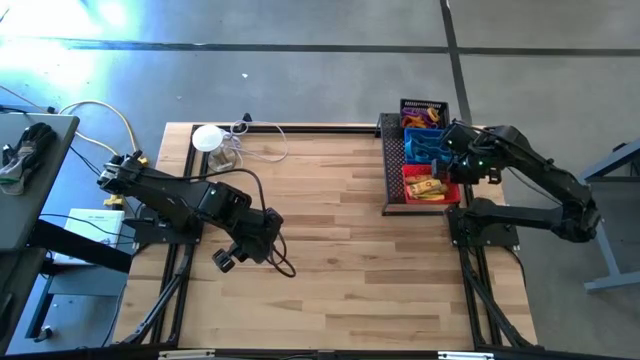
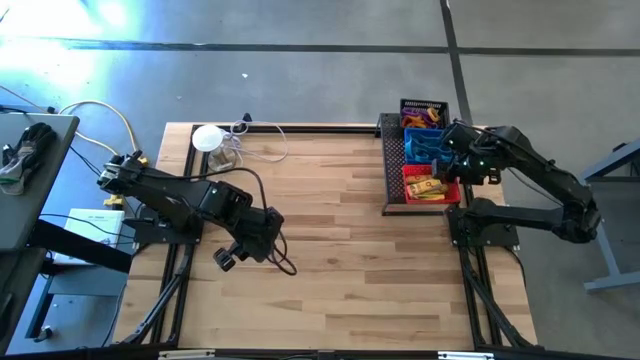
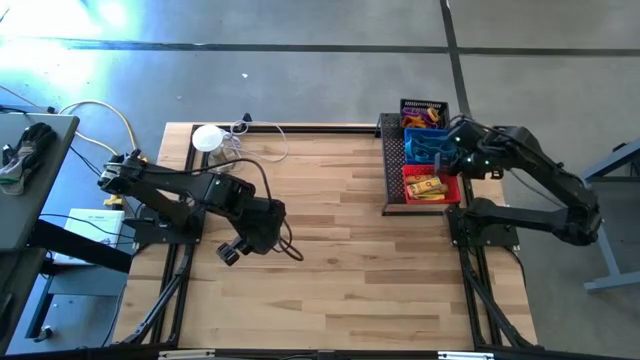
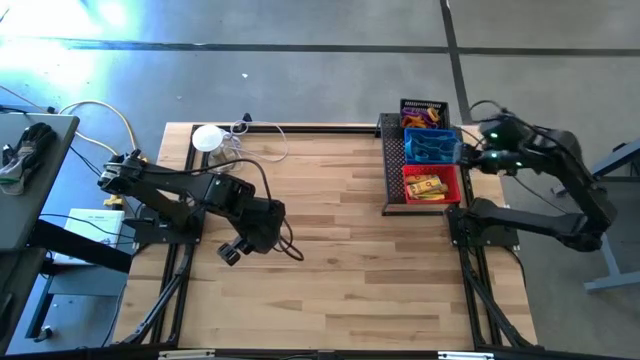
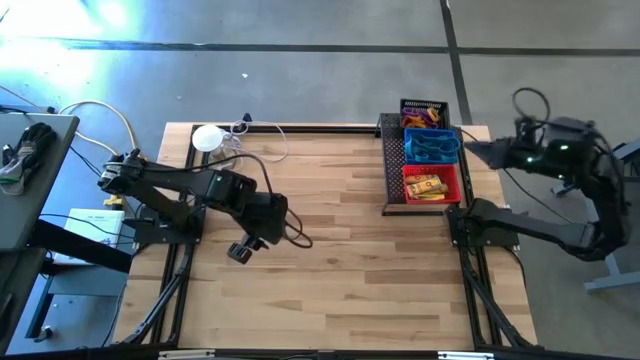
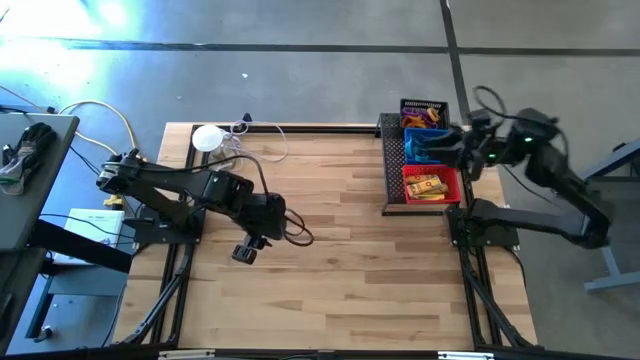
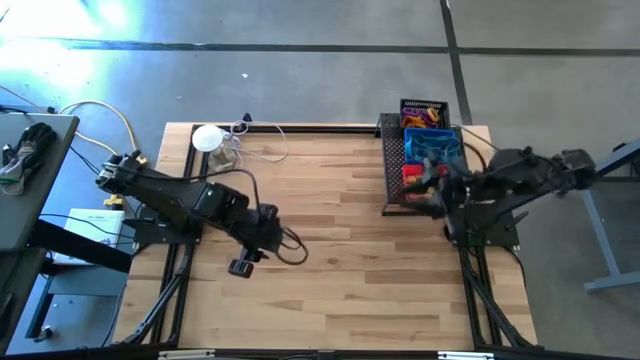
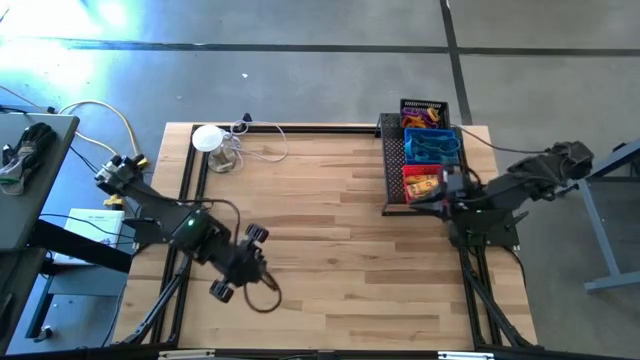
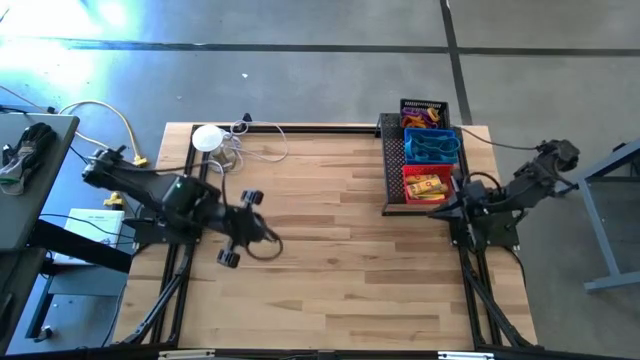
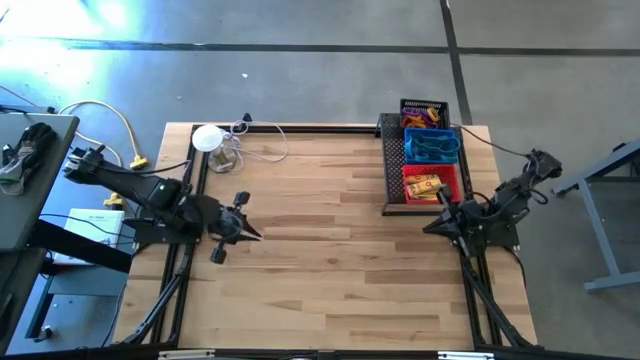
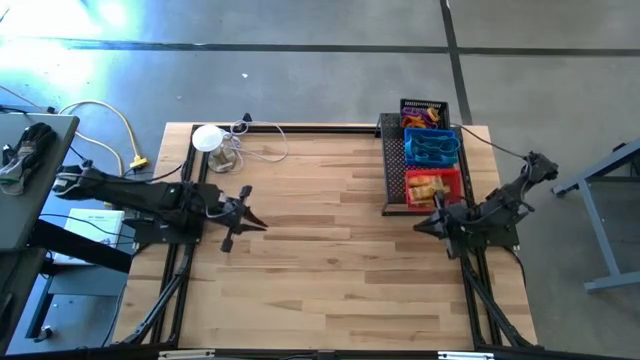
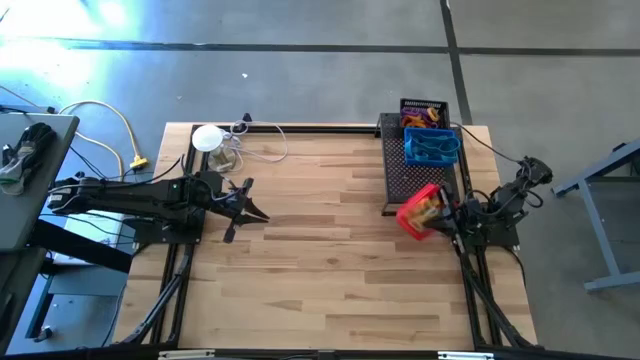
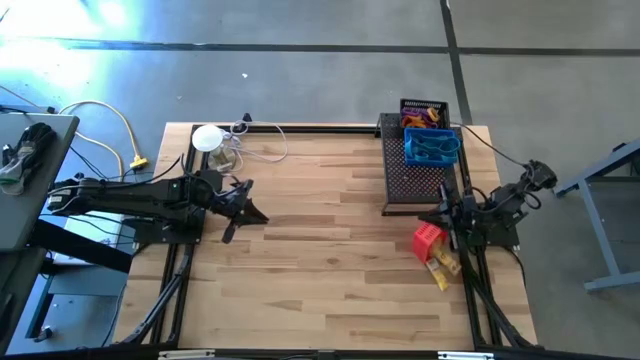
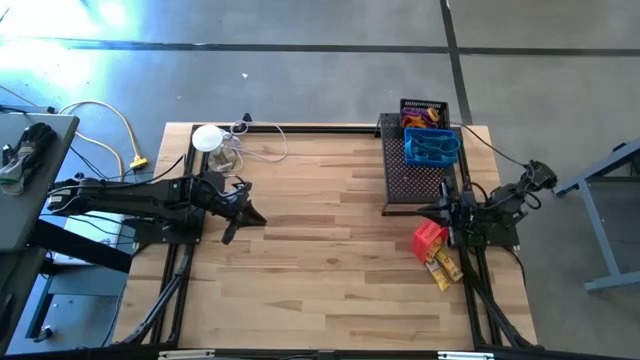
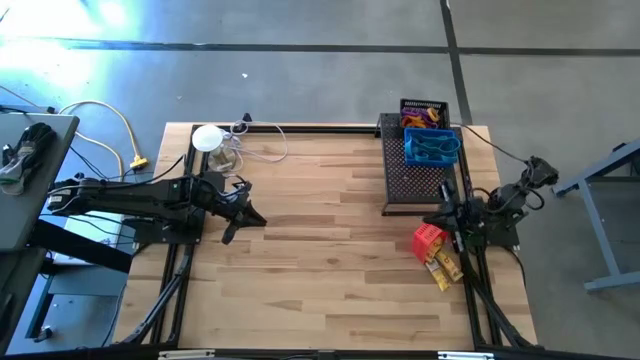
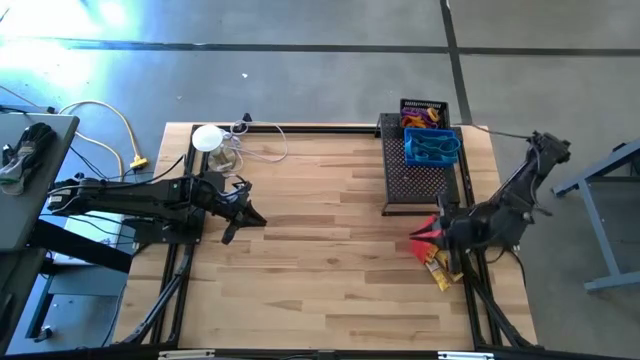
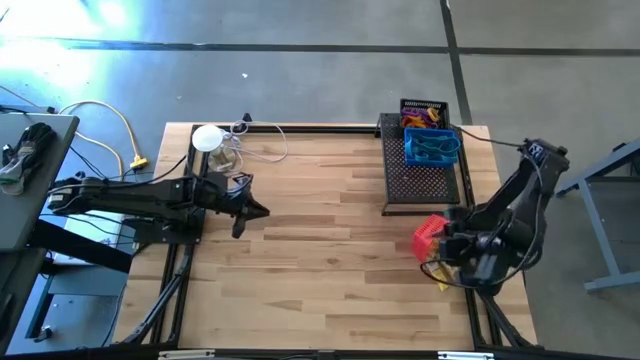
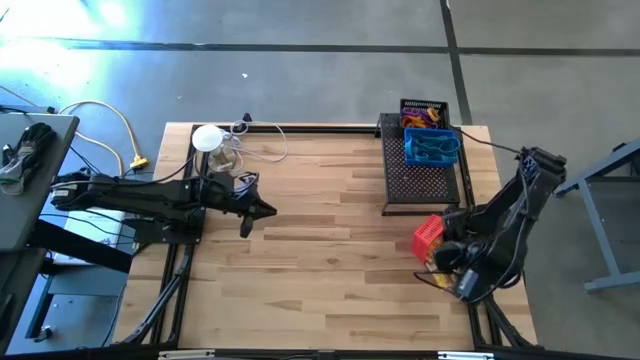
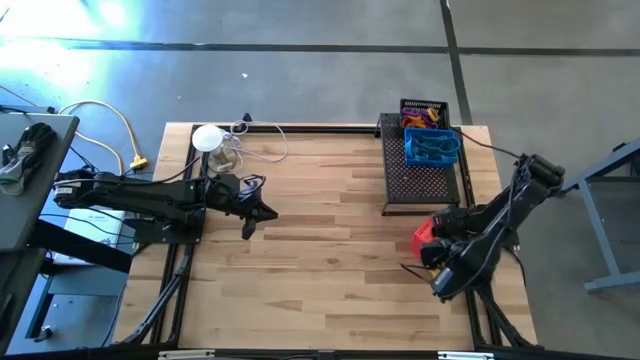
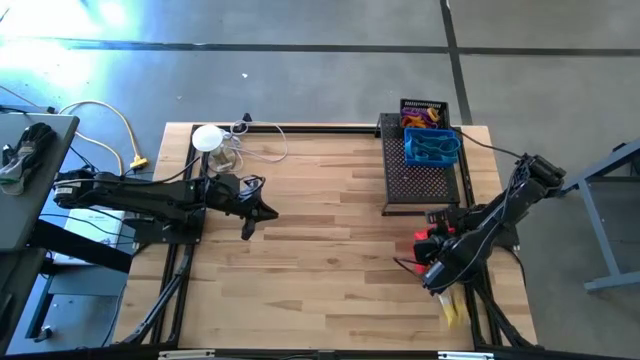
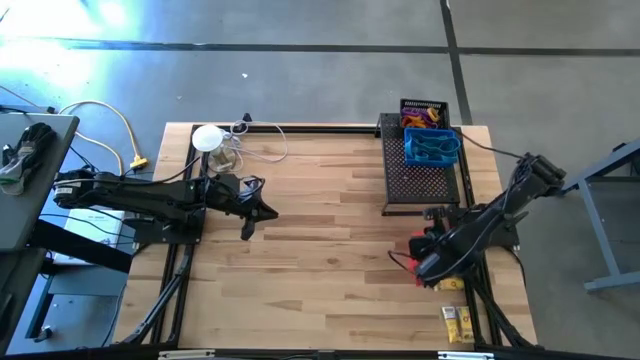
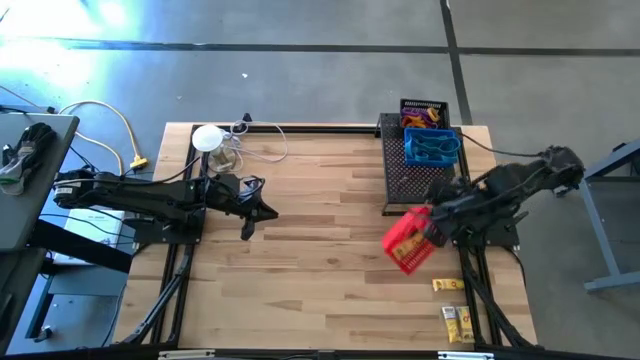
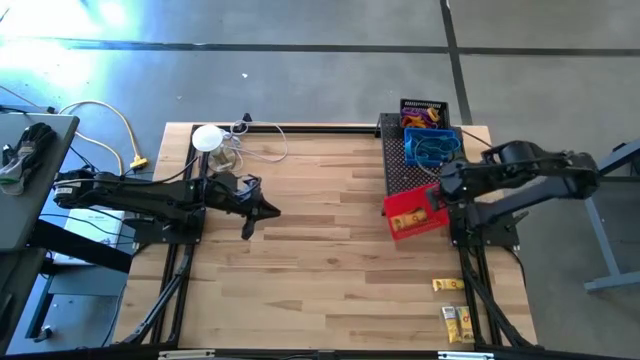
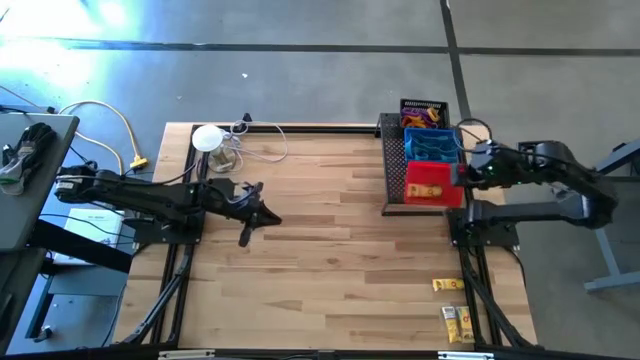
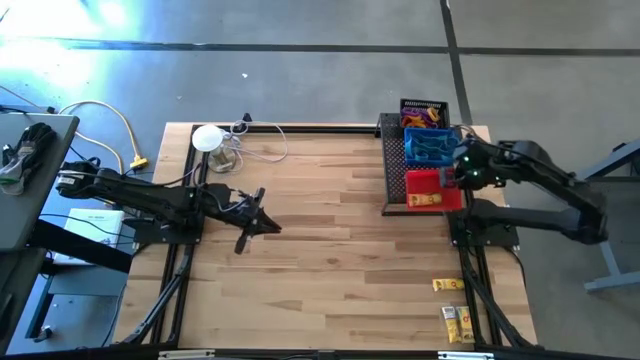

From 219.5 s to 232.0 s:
Task: Pick & Place Office Desk Supplies
Return to Home Position

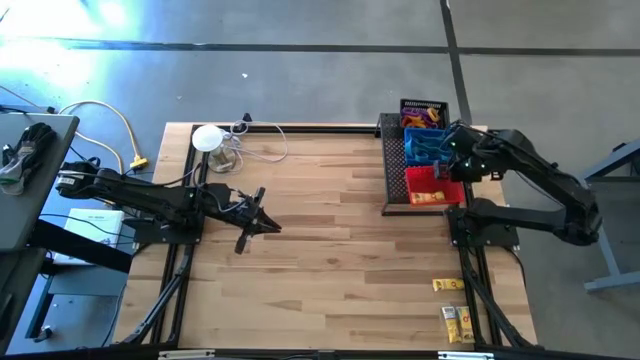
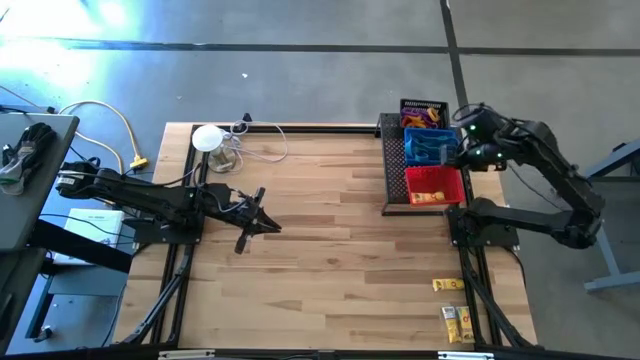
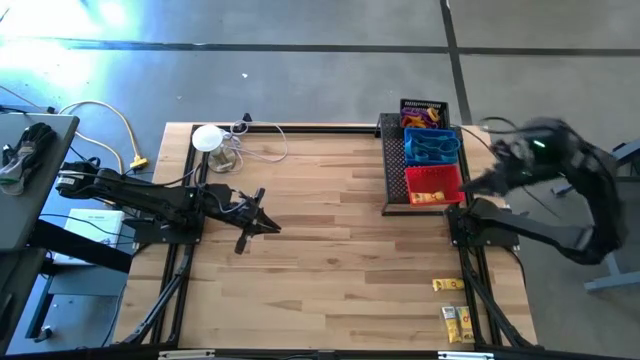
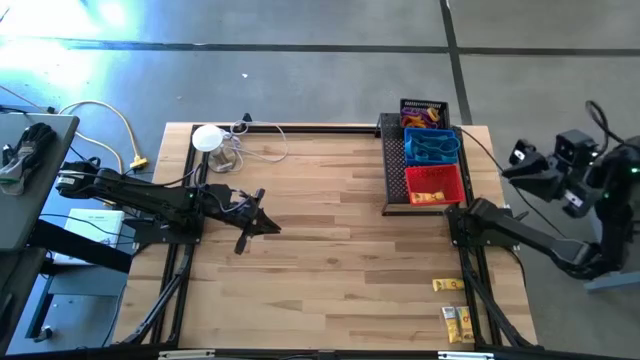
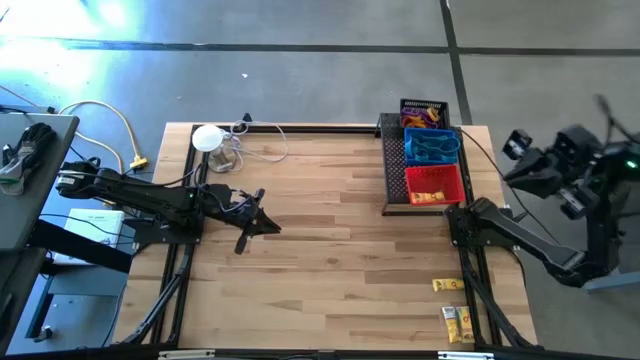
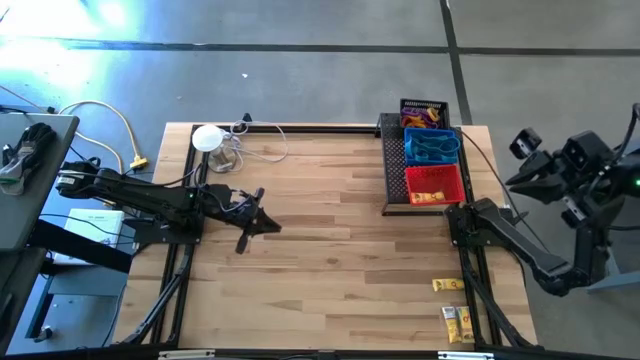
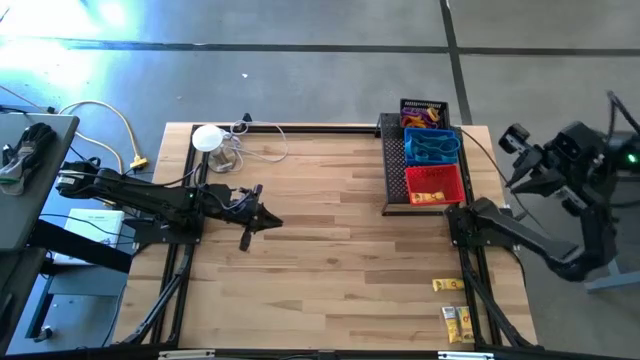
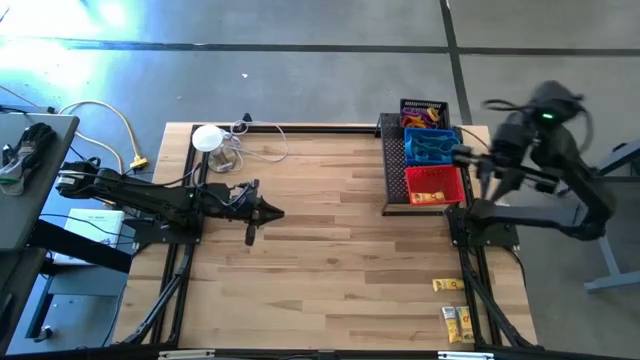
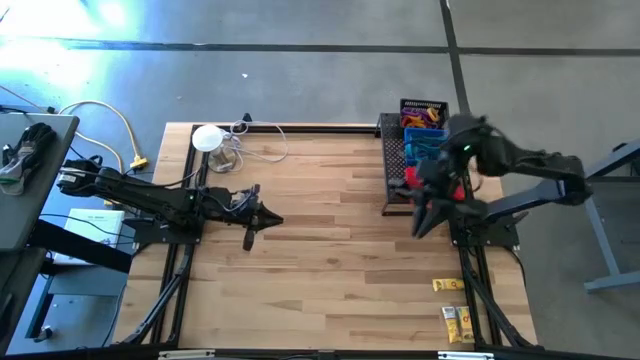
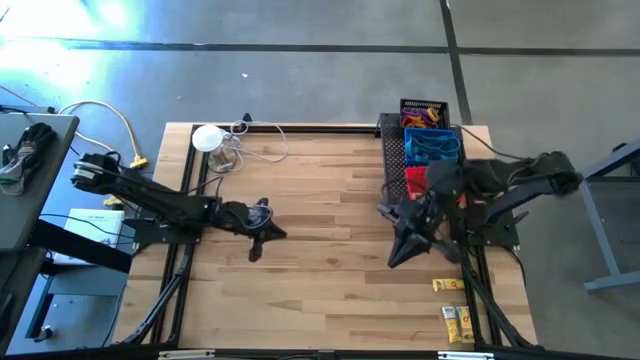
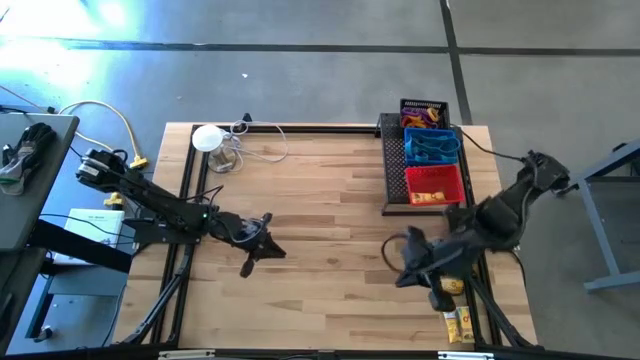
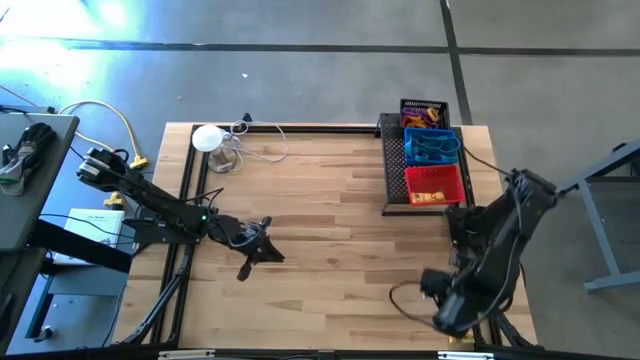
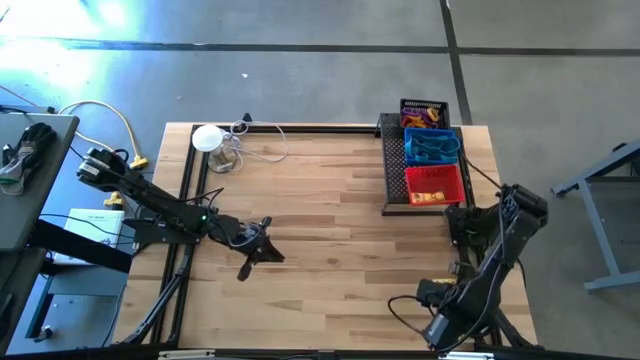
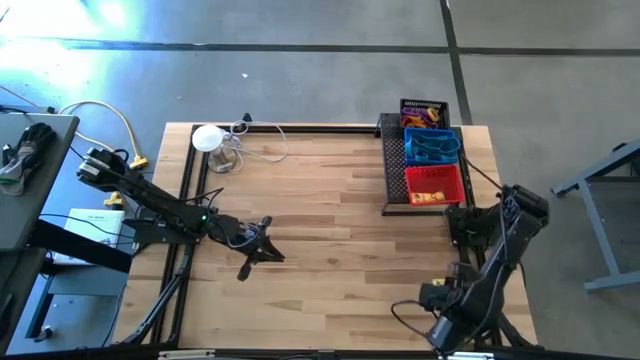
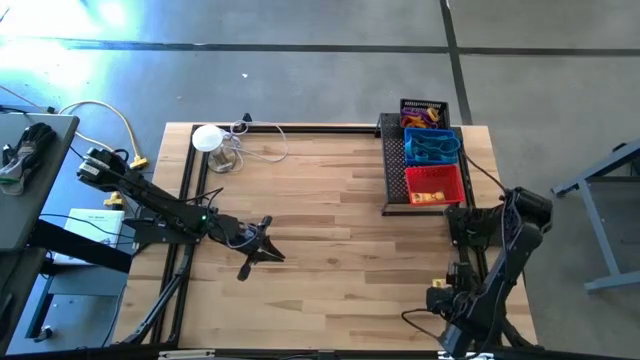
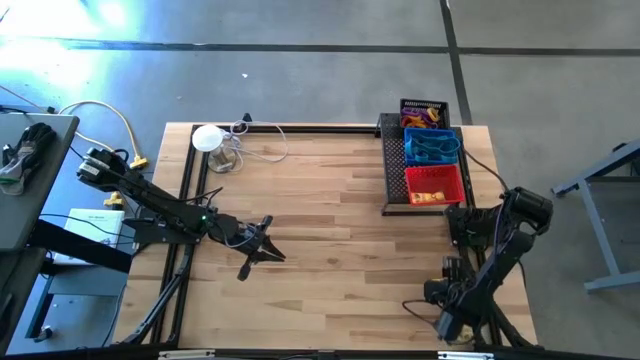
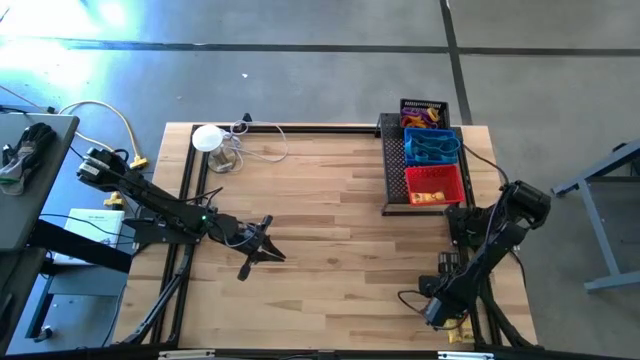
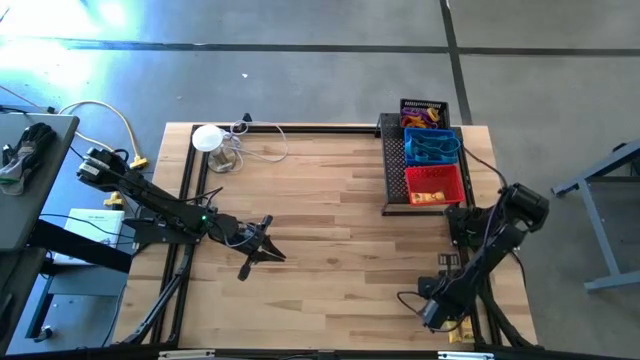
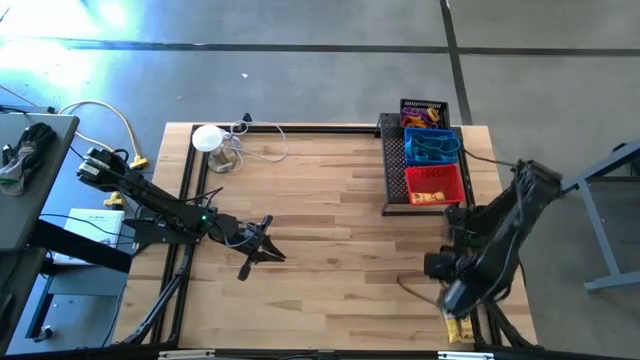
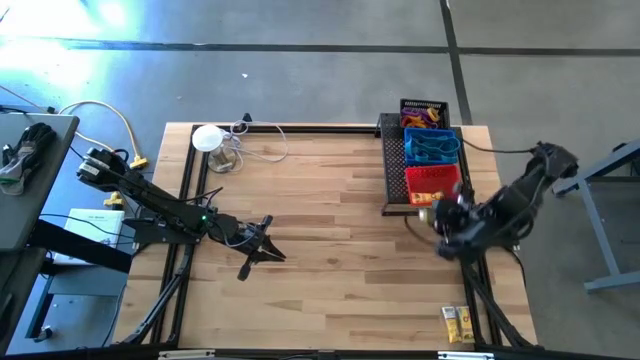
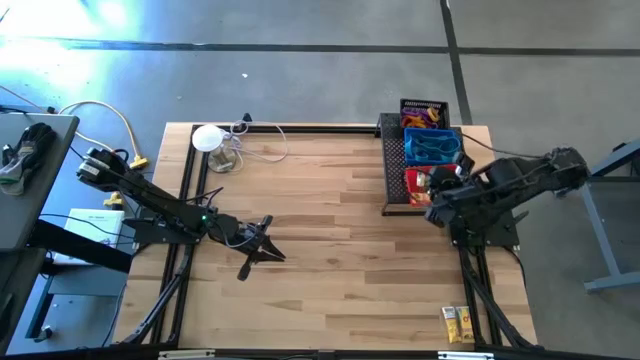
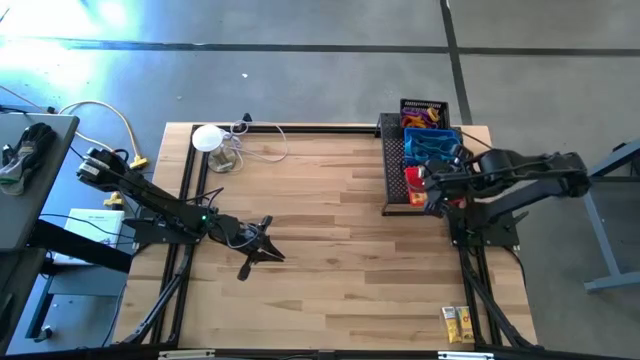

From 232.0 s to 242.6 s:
Put the top crayon box into the red bin on the shelf
